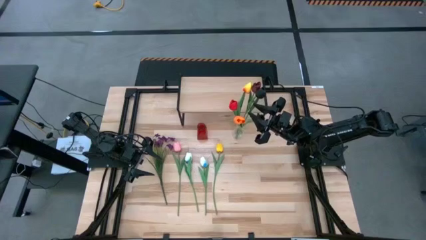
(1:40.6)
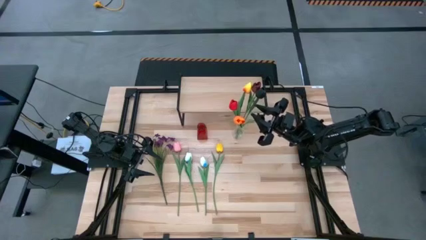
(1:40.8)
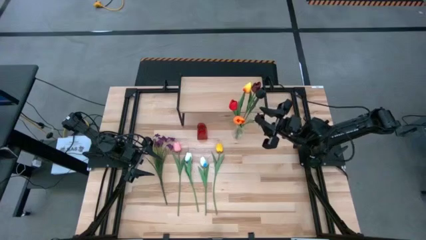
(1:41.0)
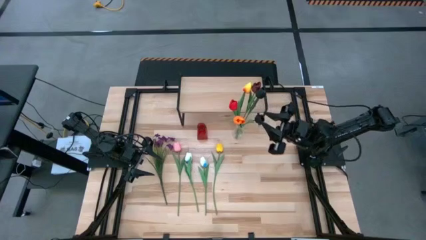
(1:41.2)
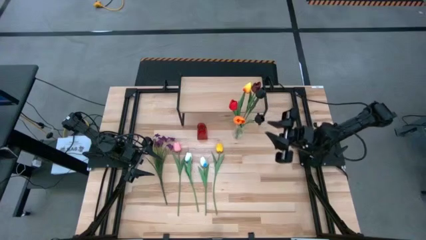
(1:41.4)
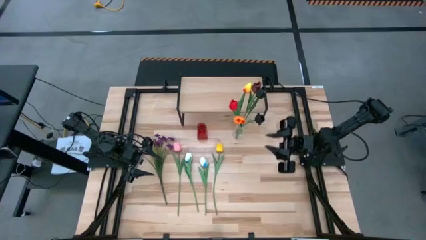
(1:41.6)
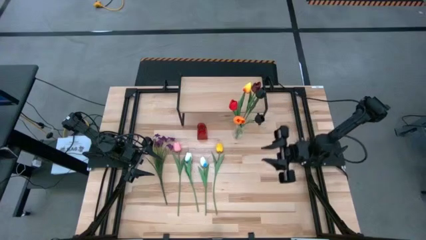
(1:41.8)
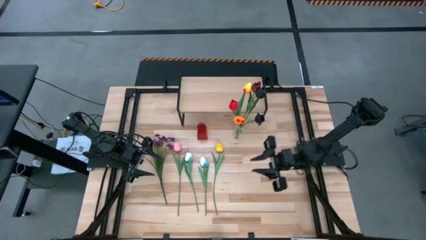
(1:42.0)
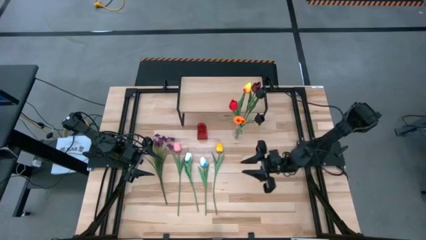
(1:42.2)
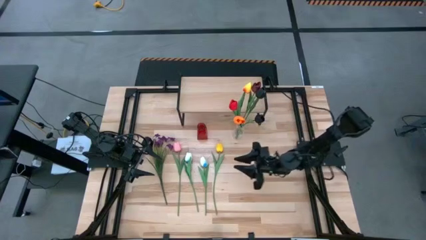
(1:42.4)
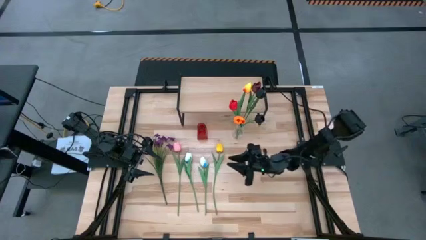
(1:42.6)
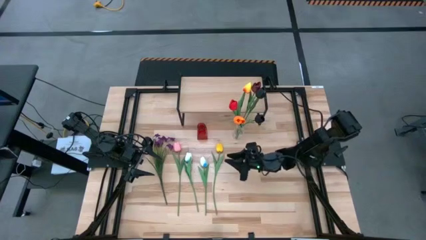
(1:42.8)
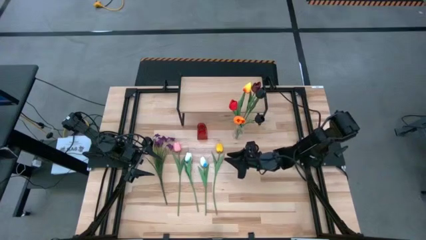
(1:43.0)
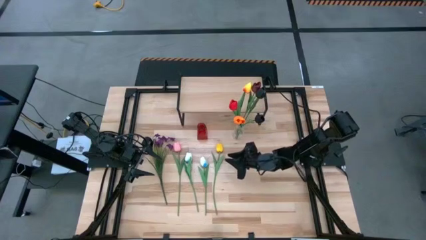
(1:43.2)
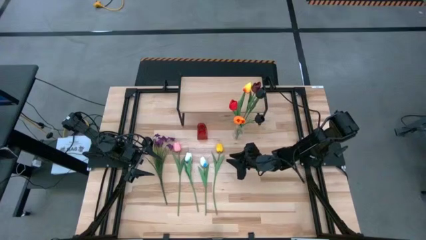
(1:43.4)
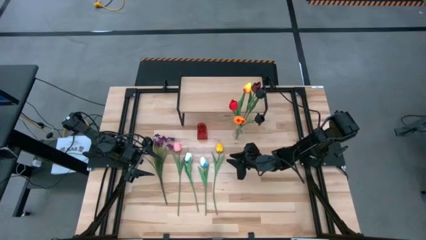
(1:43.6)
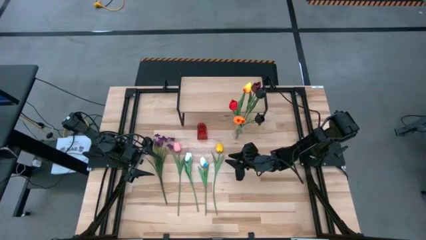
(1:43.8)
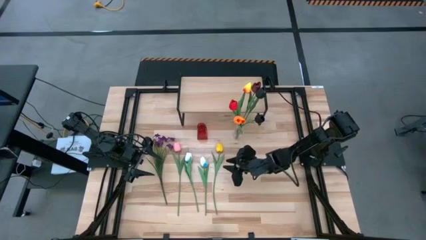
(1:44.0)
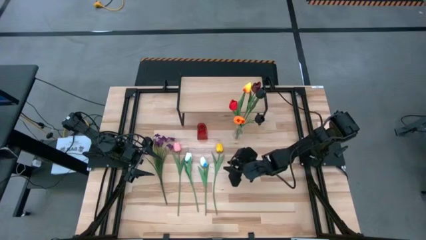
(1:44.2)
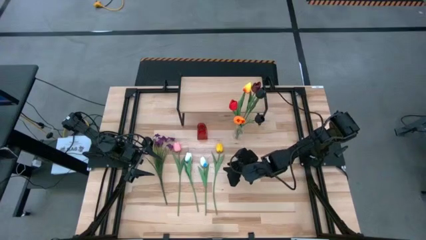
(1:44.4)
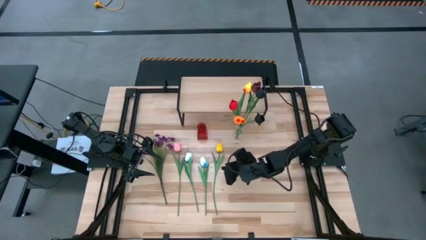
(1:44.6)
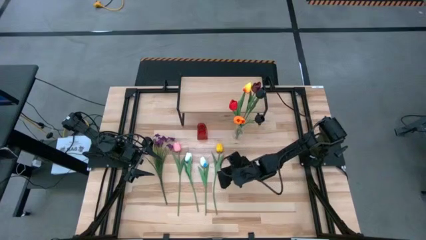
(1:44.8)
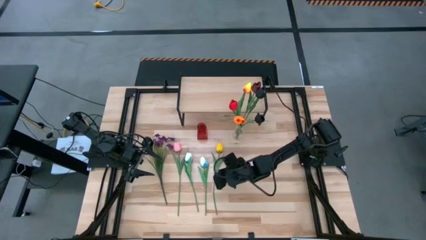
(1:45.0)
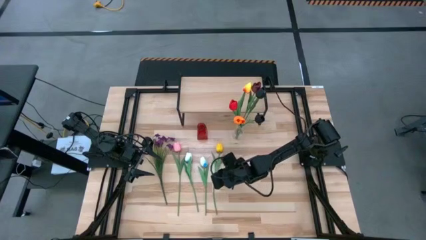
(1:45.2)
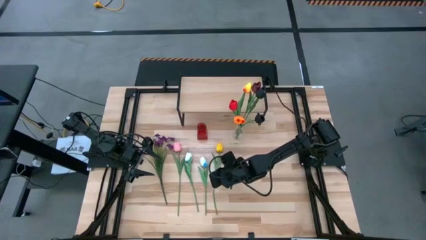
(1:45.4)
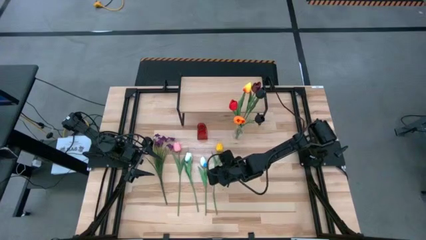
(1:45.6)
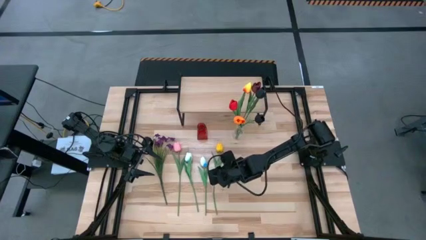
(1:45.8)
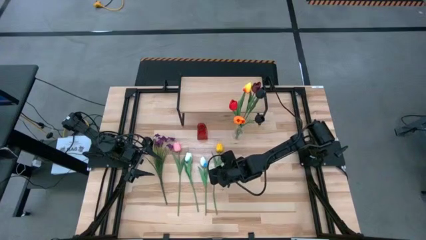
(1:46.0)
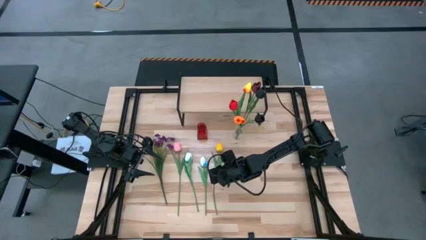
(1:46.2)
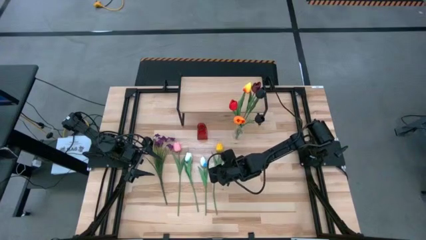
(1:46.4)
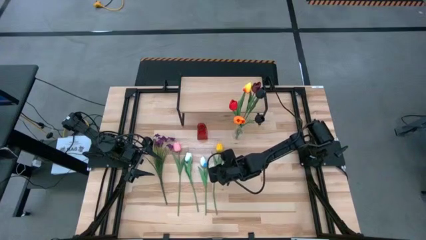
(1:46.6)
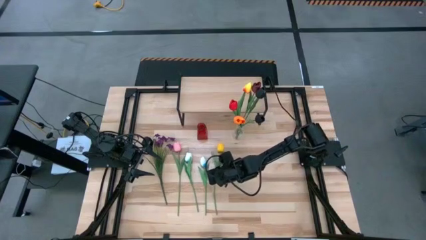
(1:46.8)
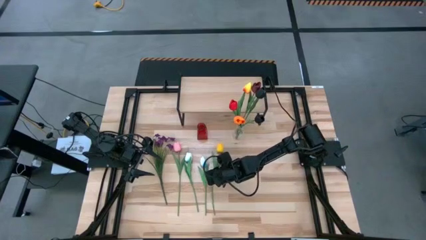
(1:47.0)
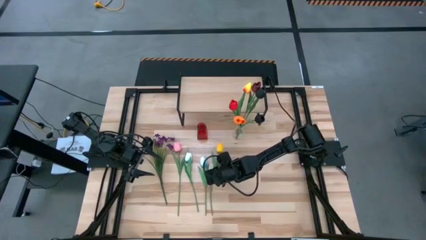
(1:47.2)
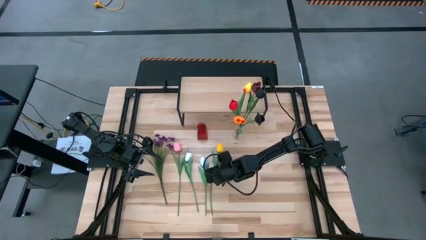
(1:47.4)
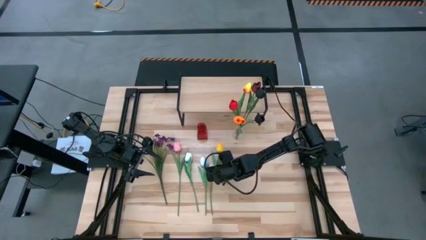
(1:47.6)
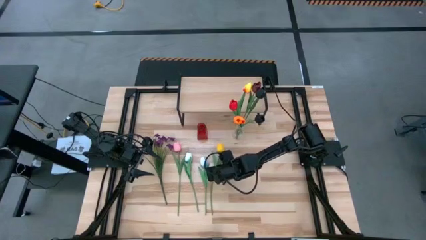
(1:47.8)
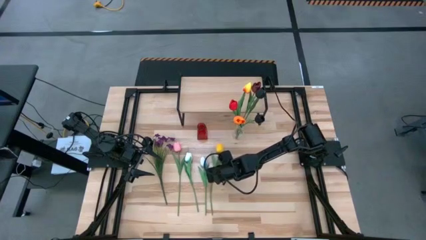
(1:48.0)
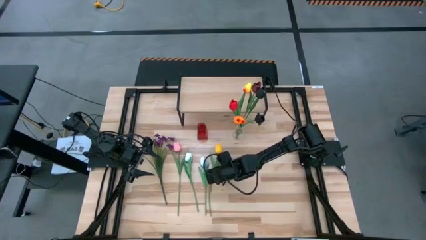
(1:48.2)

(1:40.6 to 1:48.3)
Task: Pick and place flowers into a vace then onto a shelf
Put the yellow flower into the transparent vase
